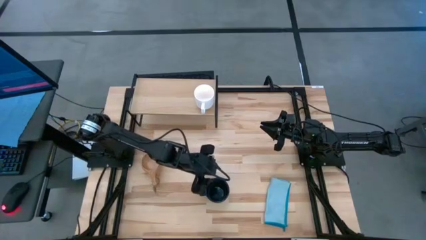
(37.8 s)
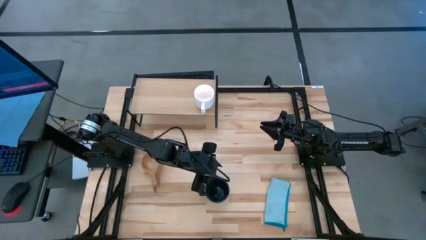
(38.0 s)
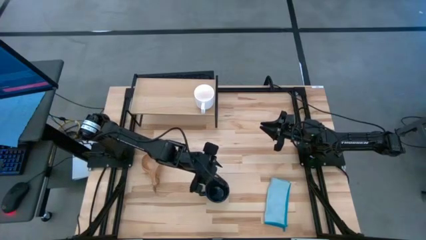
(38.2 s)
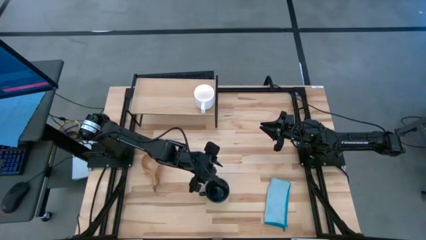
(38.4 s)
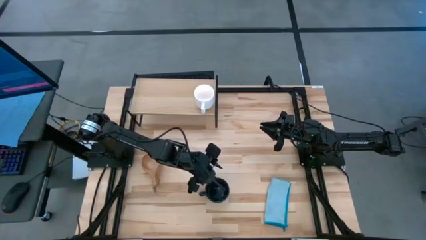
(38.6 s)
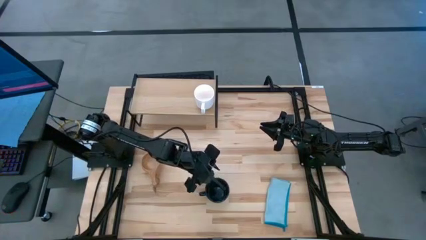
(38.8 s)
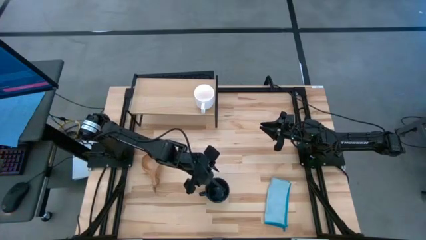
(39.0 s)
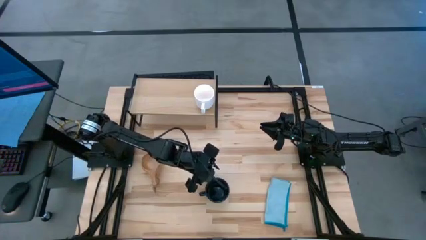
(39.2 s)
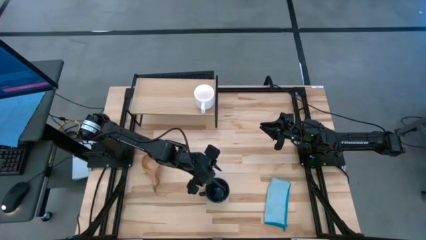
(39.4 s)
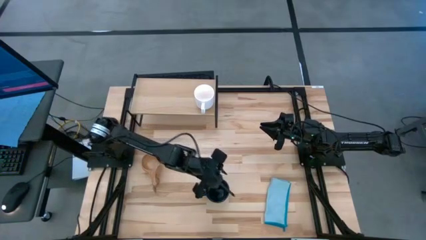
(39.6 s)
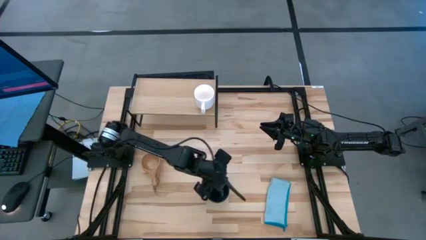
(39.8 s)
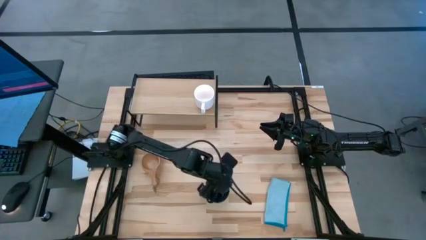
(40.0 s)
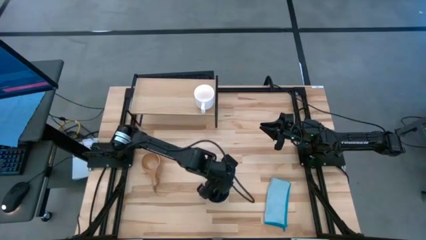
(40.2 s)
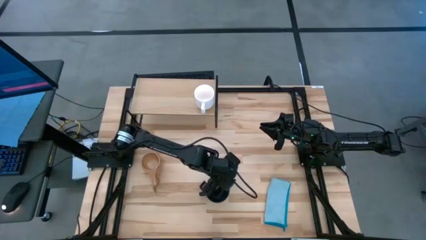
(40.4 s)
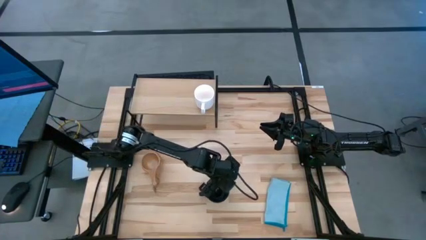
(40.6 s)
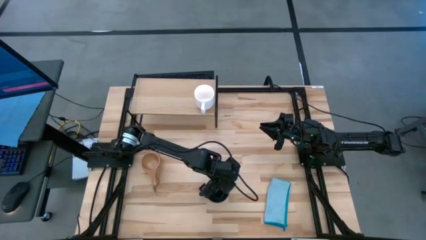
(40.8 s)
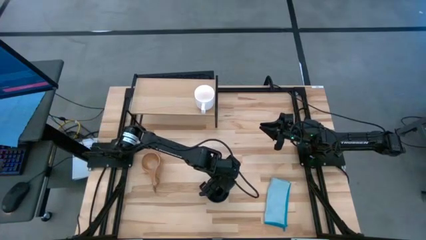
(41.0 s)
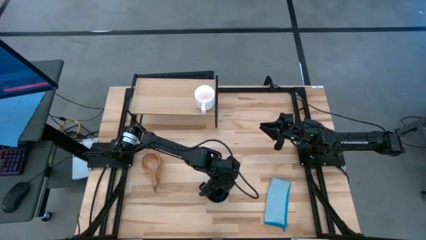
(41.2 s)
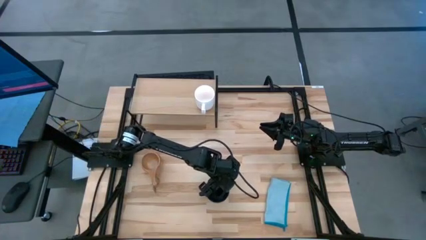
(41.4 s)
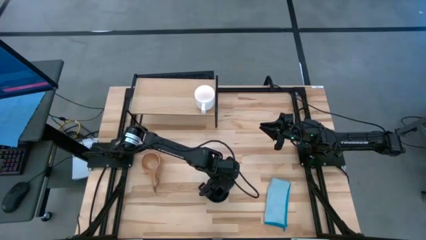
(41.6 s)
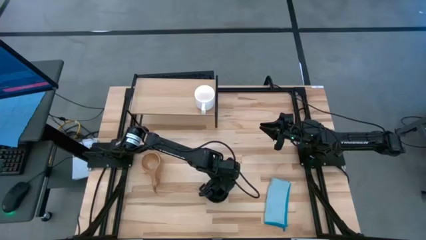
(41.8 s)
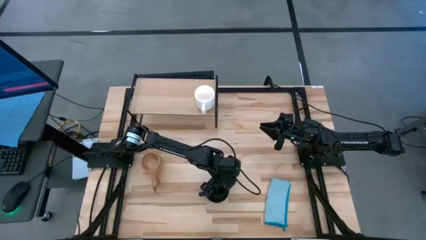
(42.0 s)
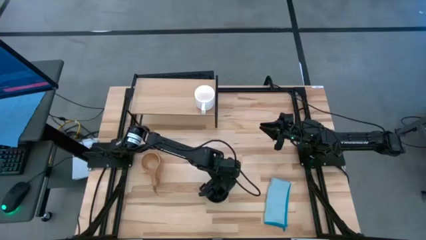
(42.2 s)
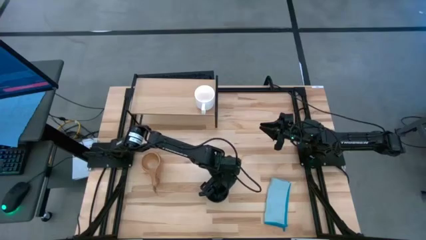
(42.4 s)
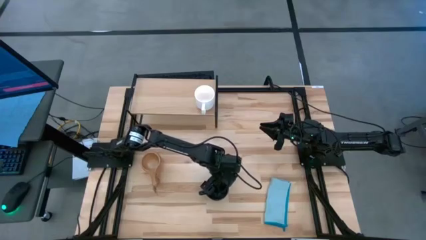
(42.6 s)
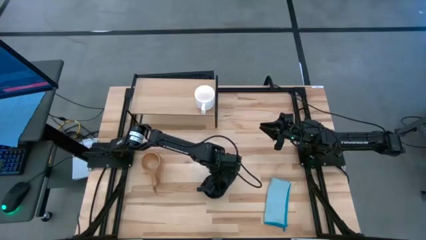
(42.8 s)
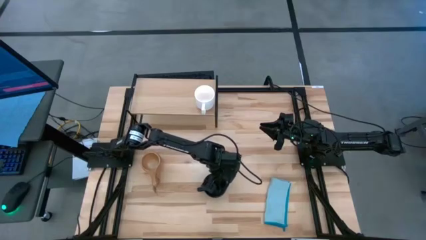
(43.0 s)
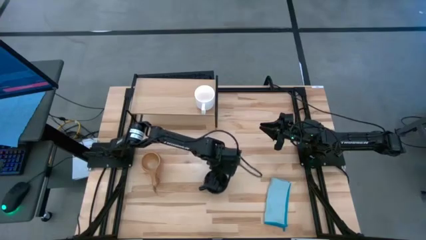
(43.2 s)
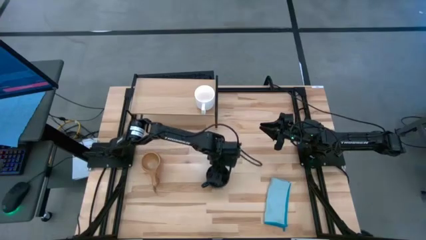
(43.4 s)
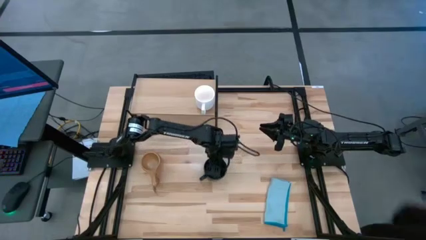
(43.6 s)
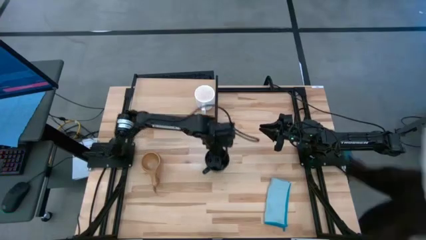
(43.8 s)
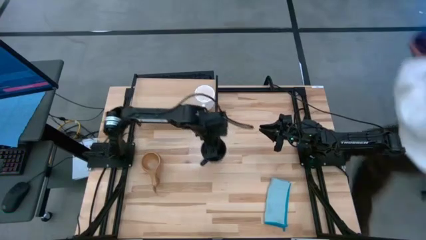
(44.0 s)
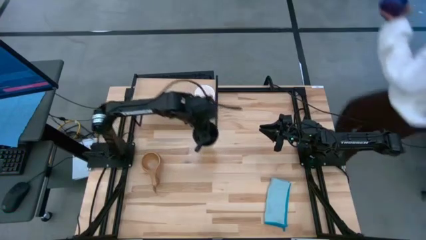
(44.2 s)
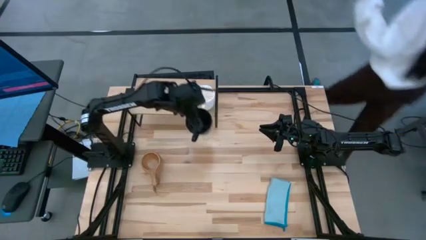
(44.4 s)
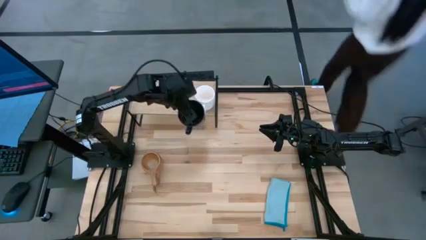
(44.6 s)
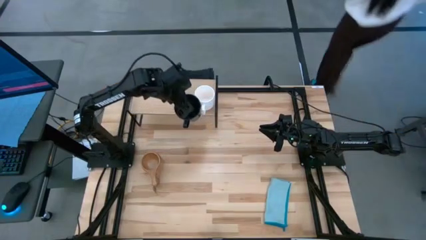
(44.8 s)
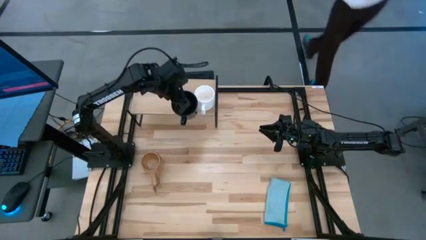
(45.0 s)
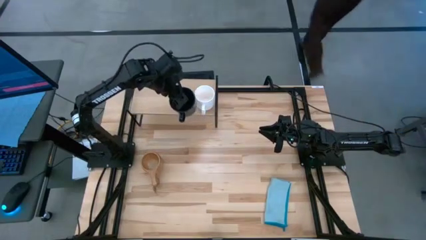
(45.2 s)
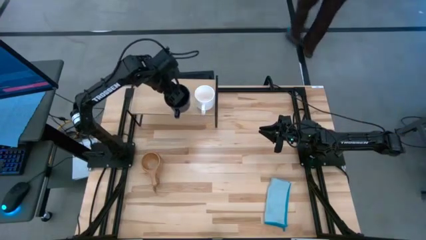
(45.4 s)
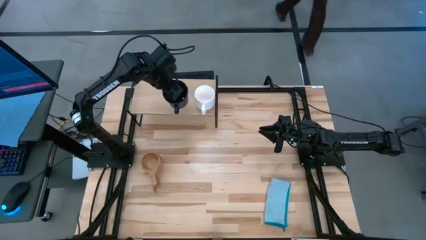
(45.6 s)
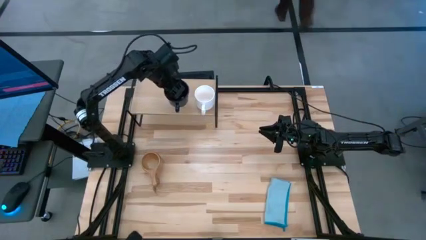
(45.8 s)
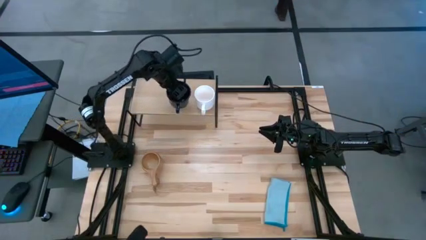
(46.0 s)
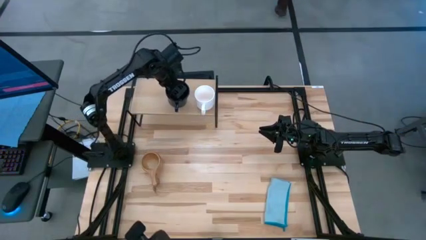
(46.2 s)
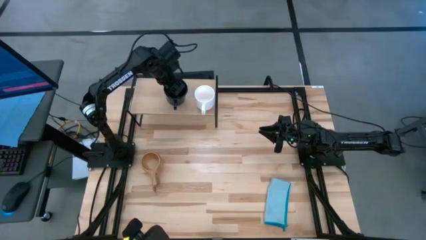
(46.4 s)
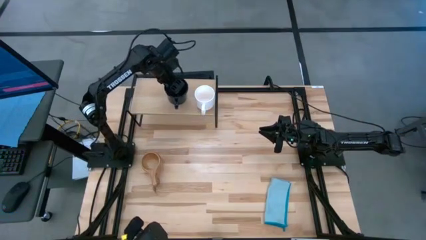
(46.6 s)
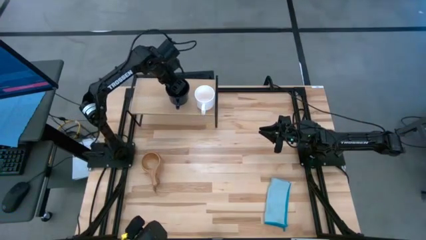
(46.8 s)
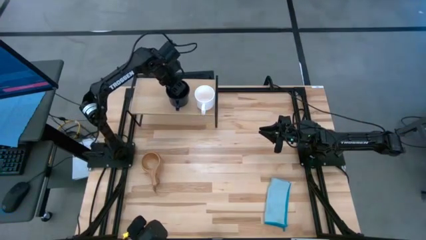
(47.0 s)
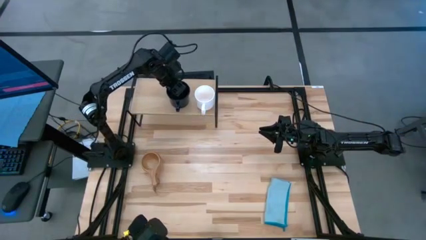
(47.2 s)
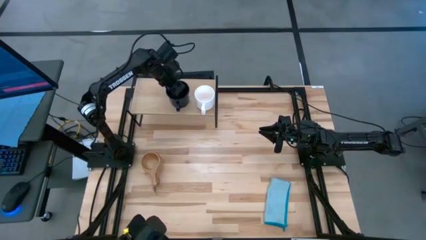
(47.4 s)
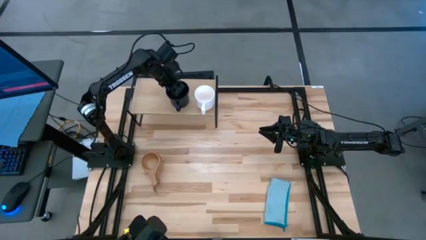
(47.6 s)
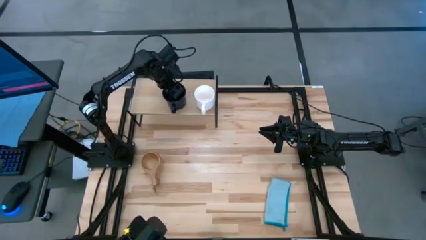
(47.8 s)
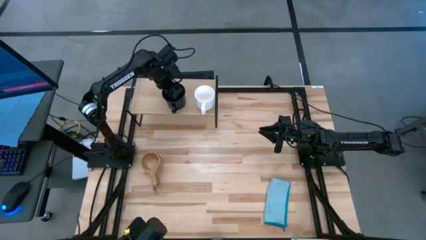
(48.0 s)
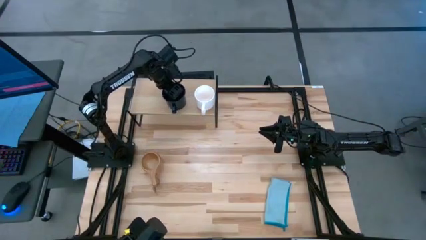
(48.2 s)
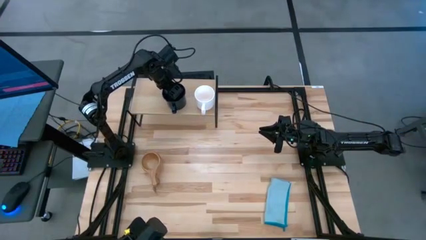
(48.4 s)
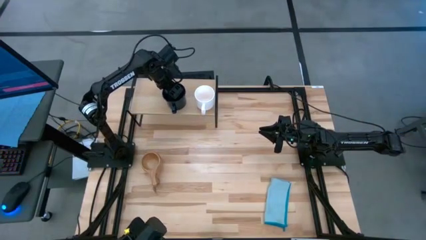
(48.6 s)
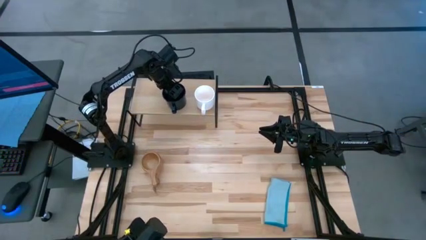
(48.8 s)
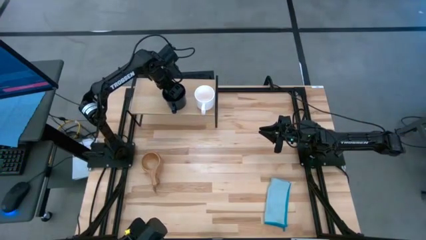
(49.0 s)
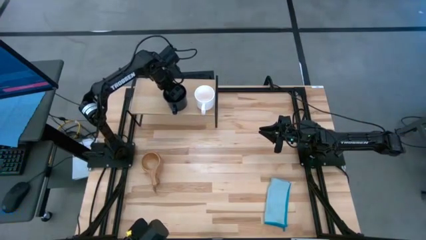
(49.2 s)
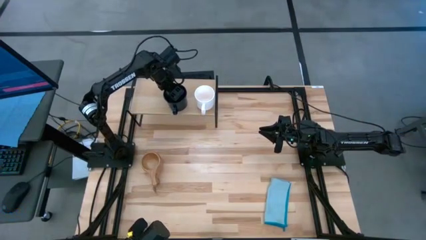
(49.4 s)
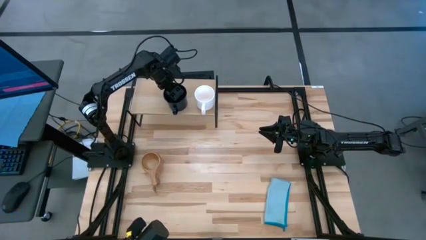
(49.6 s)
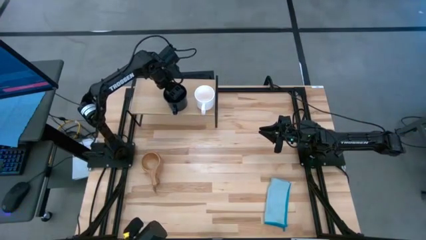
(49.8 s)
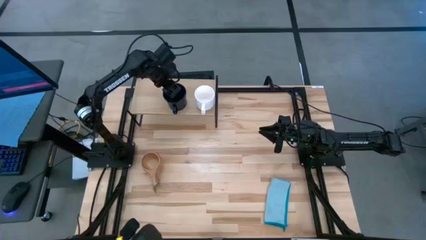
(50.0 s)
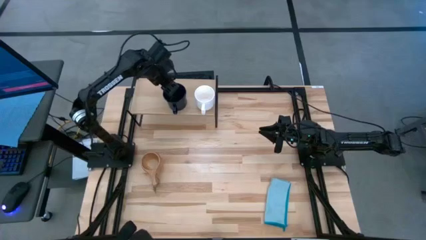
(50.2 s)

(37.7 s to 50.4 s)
Task: Stack small to large cups/mugs on shelf
Put the dark blue mug on the shelf

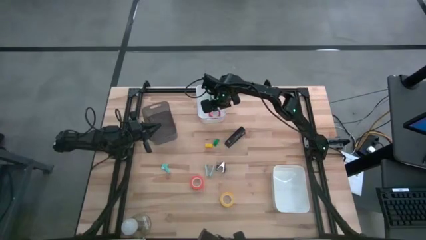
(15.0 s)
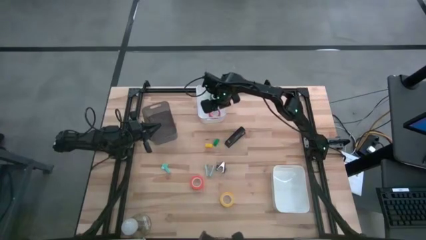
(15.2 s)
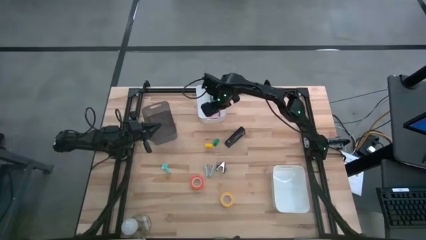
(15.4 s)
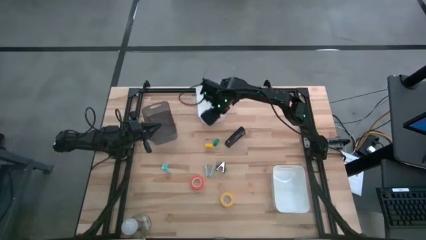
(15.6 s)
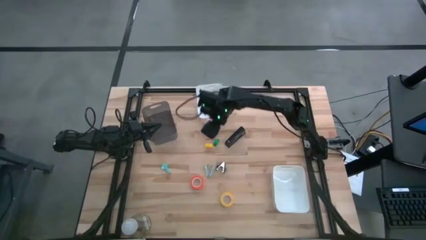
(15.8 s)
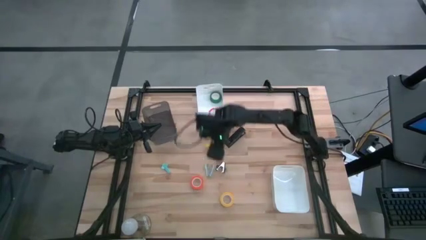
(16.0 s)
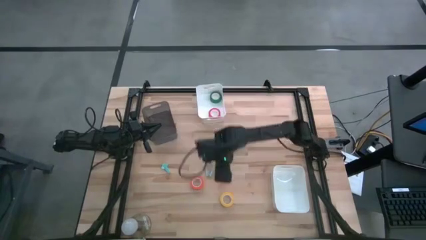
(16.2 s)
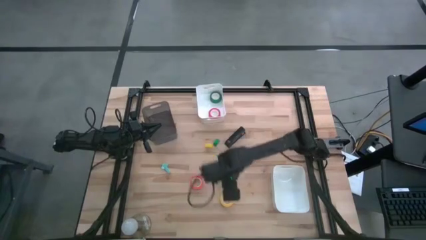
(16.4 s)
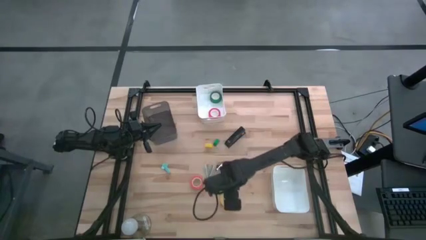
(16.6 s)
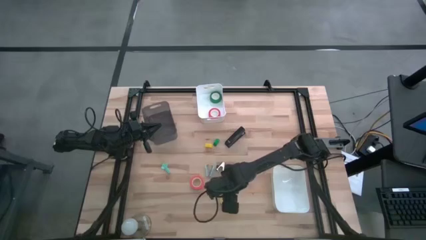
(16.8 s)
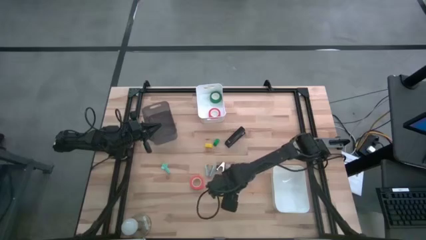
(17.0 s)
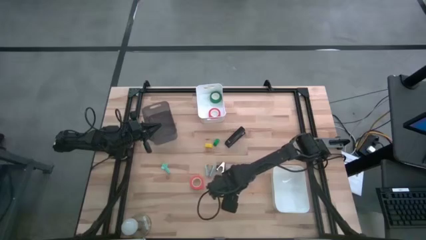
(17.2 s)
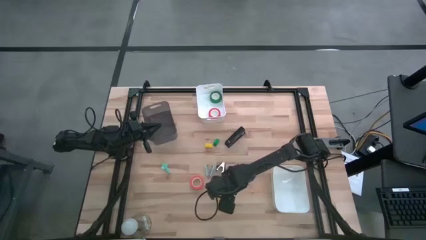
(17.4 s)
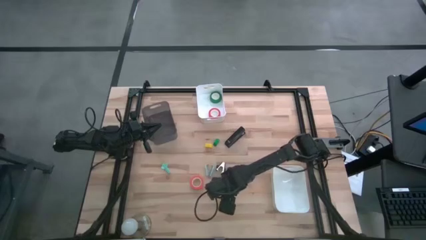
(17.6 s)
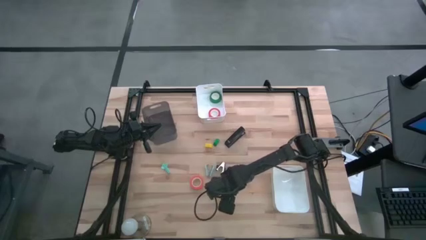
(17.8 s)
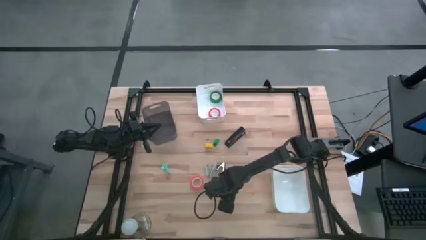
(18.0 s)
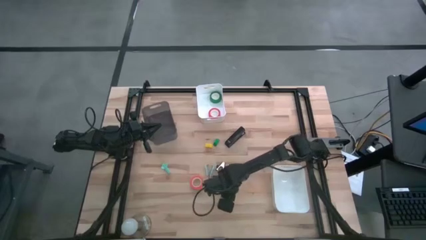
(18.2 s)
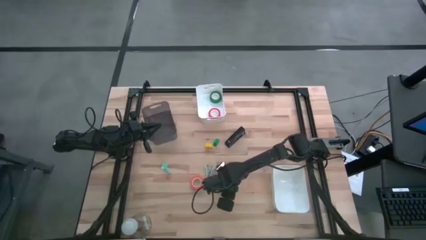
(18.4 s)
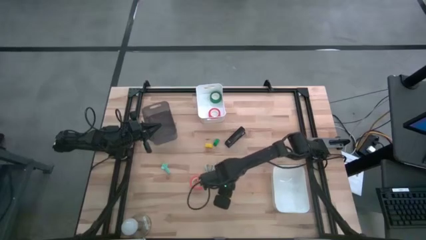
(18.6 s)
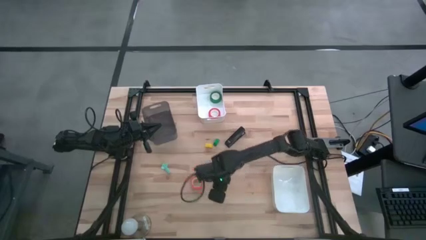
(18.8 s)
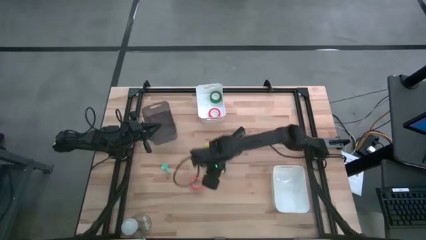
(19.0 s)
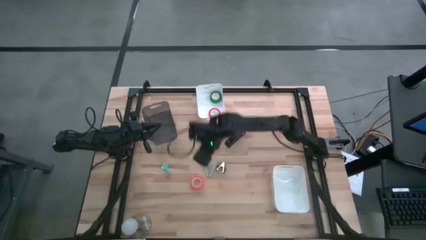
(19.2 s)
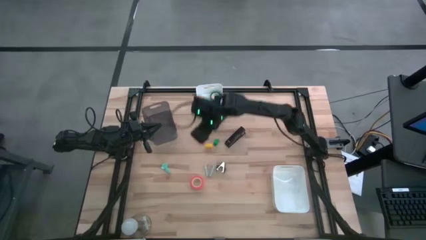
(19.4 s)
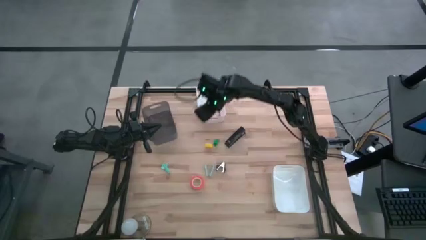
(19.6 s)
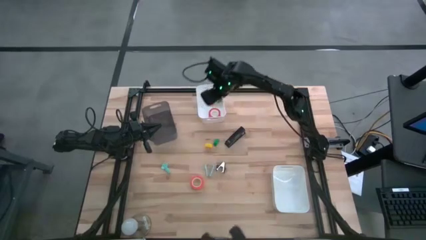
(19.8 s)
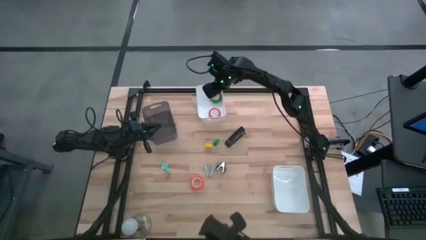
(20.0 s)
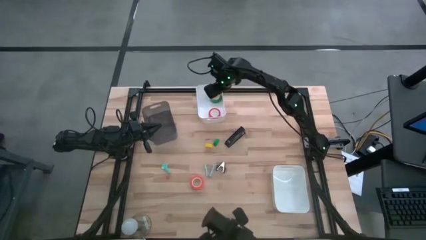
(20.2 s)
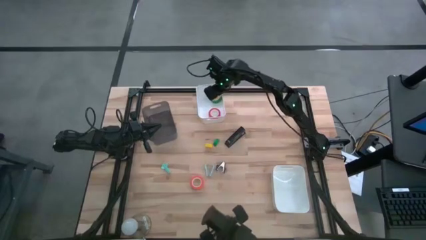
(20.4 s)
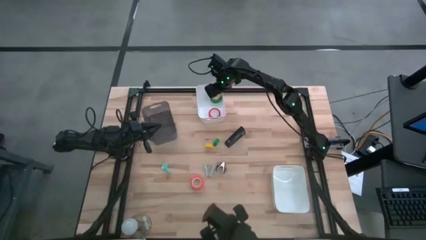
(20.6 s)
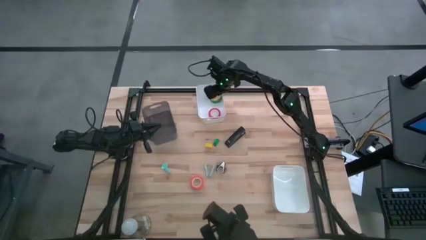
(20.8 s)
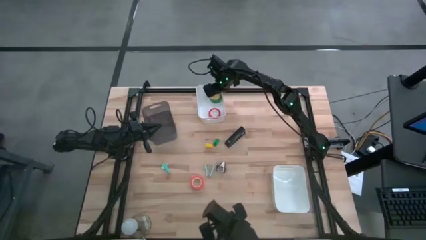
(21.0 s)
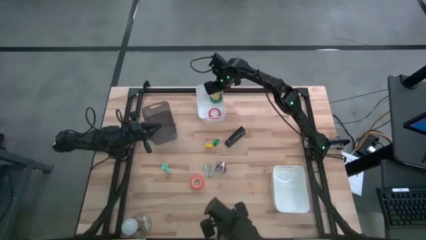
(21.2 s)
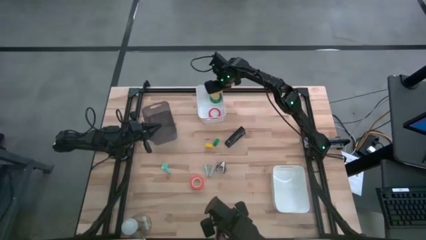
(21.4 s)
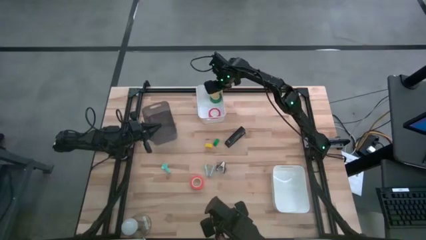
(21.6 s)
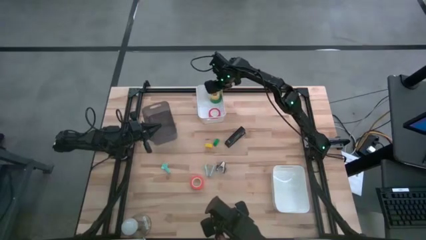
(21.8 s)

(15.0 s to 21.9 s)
Task: Pick and place Stapler, Stapler remover, tape
Put the yellow tape into the top white bin
